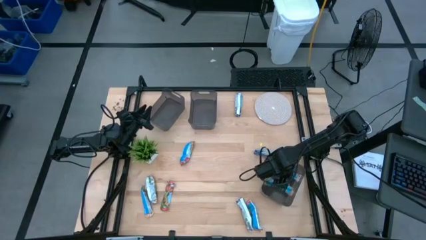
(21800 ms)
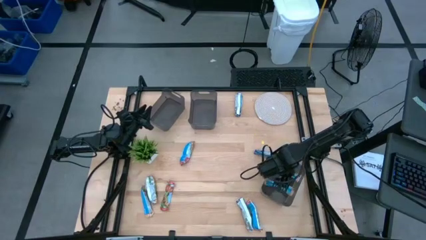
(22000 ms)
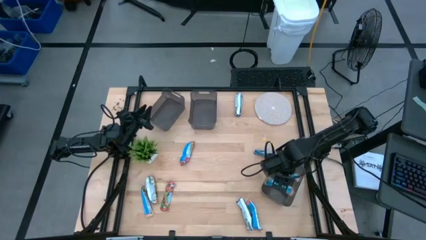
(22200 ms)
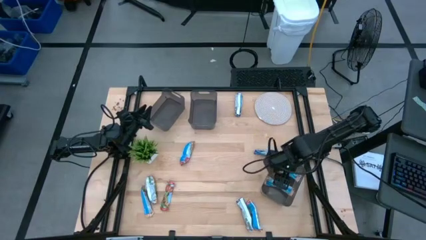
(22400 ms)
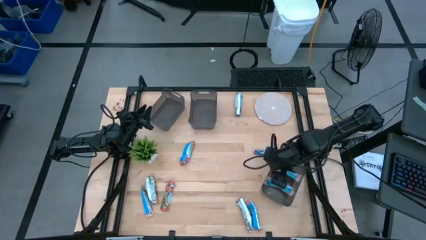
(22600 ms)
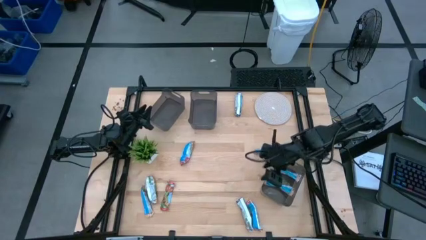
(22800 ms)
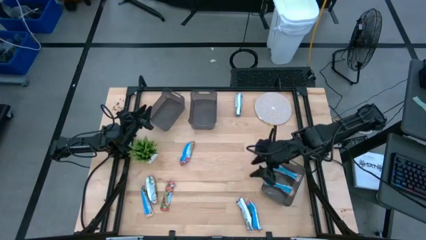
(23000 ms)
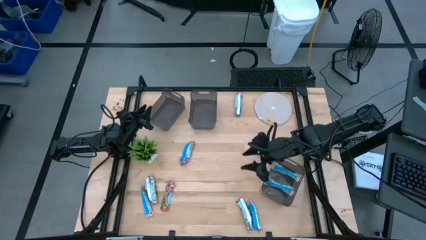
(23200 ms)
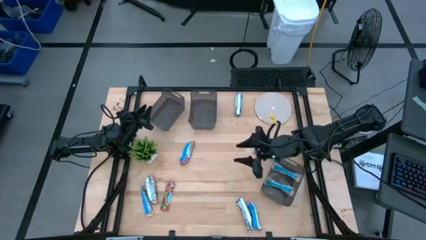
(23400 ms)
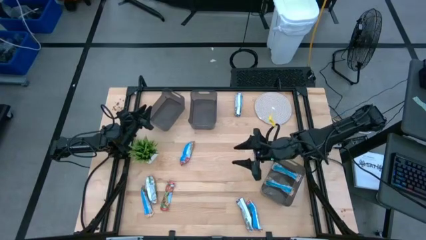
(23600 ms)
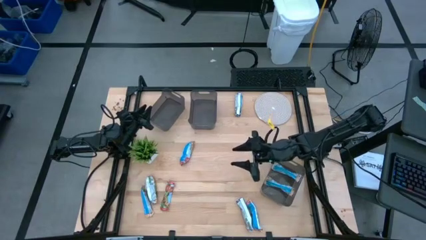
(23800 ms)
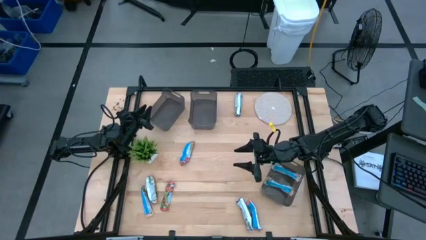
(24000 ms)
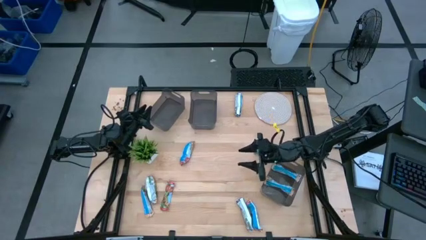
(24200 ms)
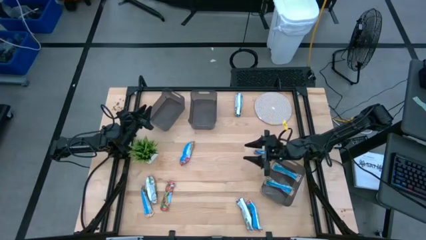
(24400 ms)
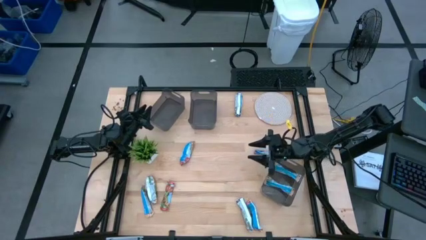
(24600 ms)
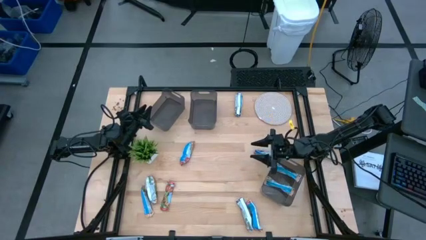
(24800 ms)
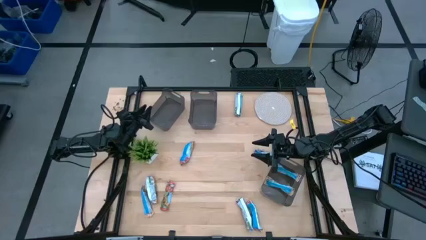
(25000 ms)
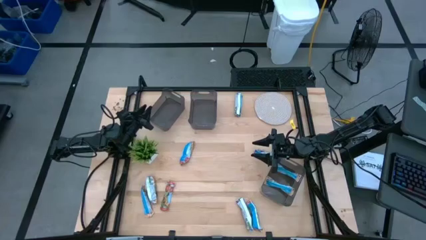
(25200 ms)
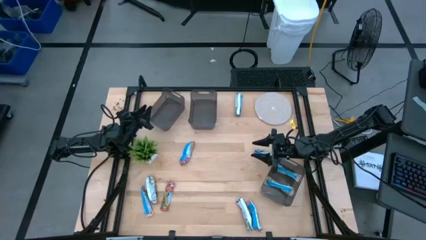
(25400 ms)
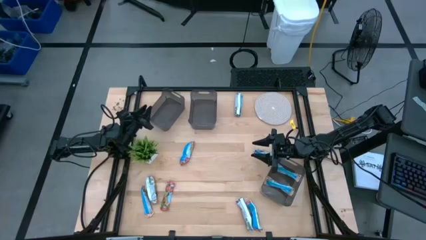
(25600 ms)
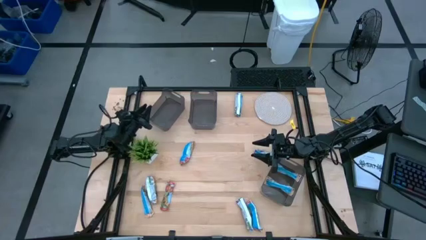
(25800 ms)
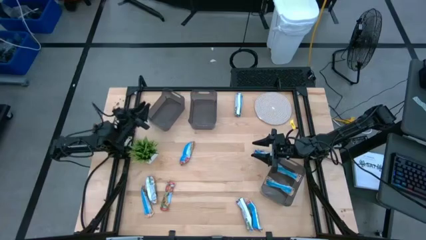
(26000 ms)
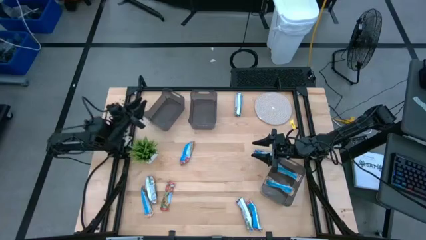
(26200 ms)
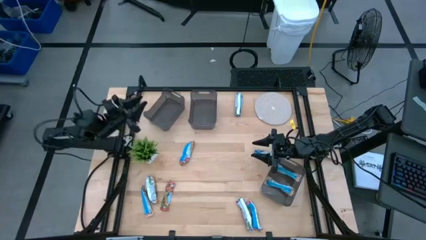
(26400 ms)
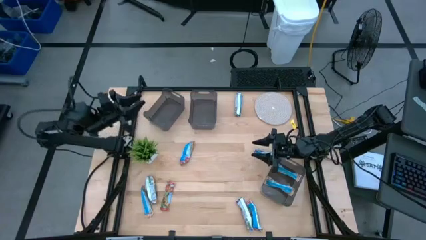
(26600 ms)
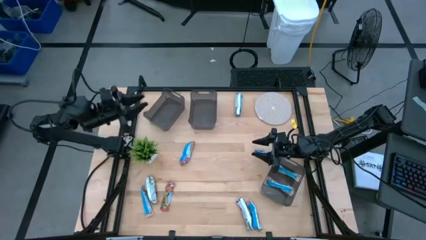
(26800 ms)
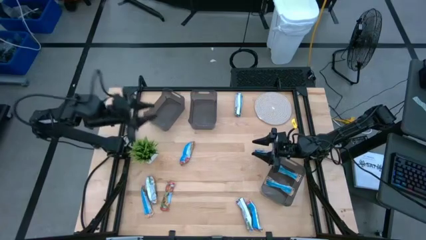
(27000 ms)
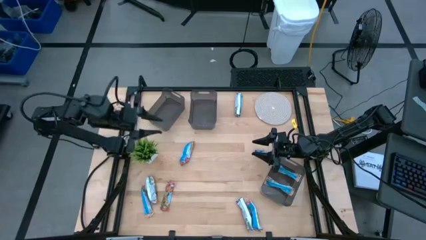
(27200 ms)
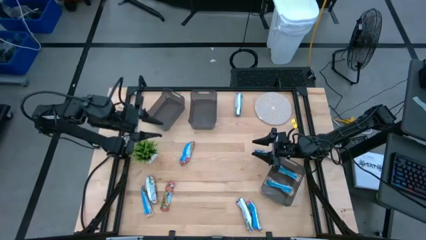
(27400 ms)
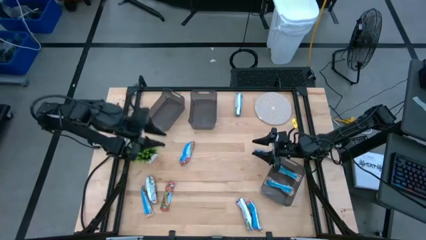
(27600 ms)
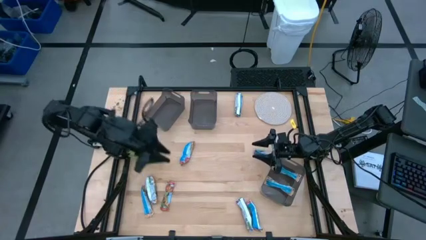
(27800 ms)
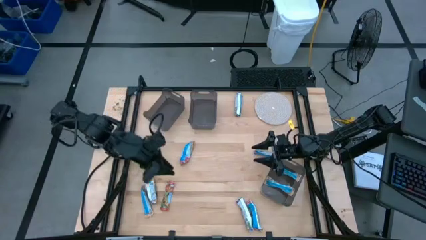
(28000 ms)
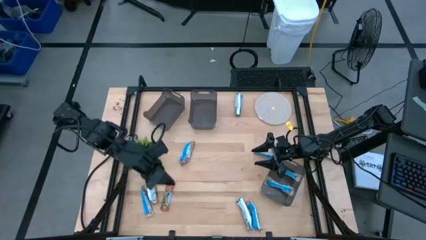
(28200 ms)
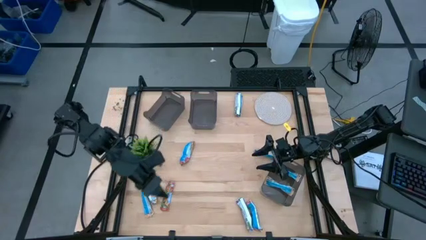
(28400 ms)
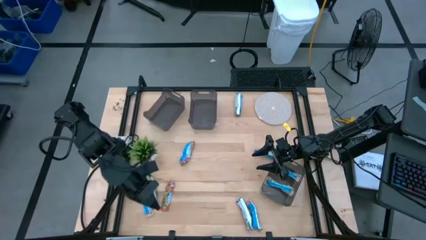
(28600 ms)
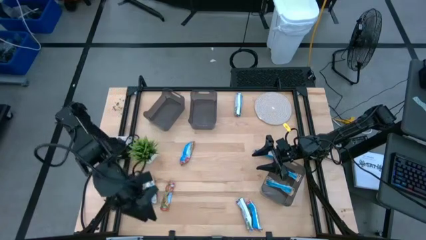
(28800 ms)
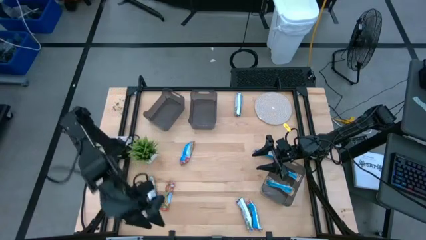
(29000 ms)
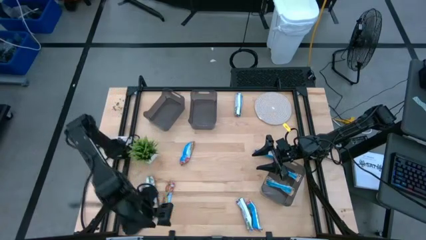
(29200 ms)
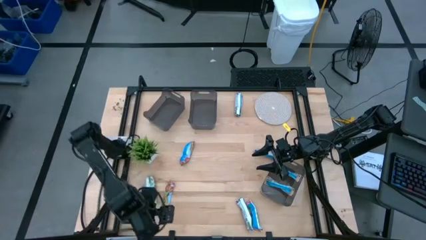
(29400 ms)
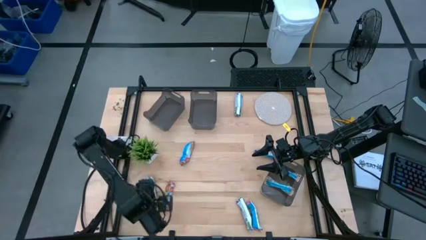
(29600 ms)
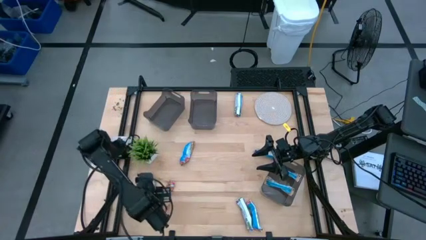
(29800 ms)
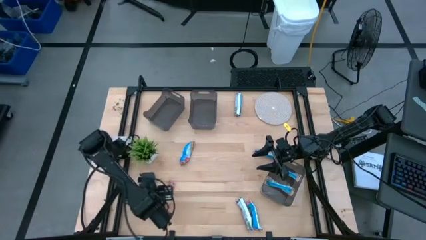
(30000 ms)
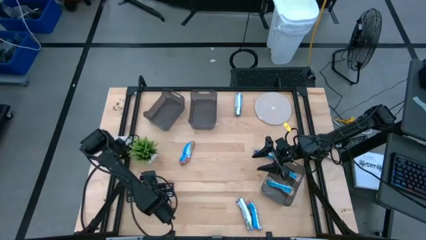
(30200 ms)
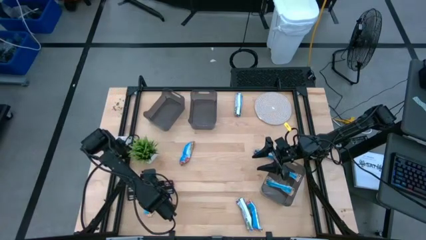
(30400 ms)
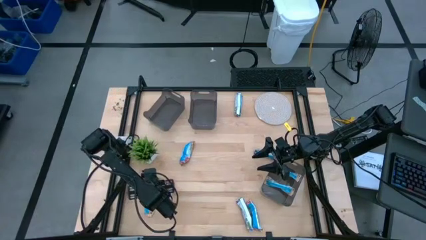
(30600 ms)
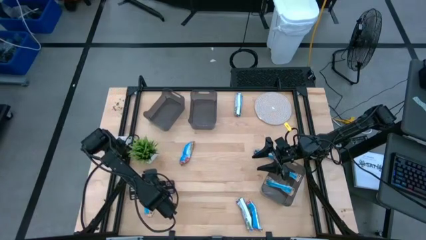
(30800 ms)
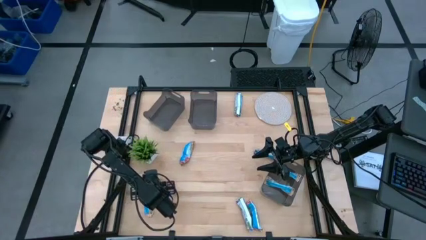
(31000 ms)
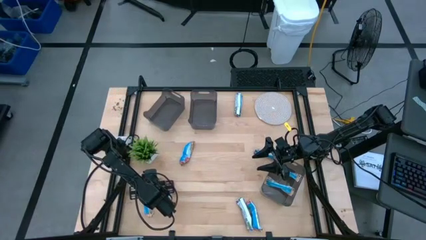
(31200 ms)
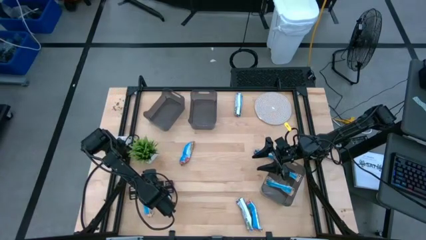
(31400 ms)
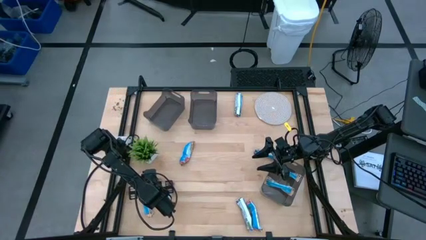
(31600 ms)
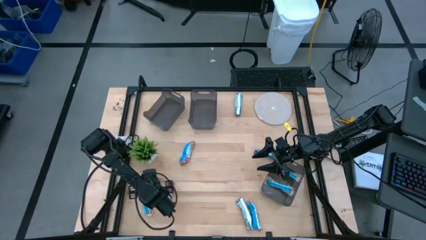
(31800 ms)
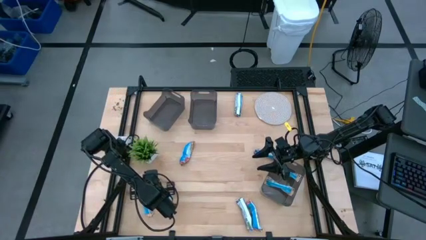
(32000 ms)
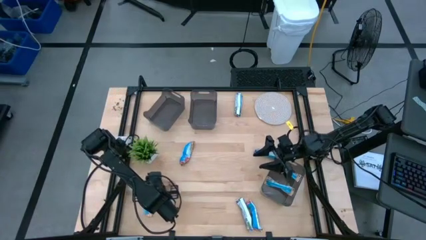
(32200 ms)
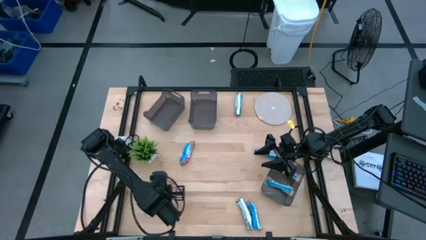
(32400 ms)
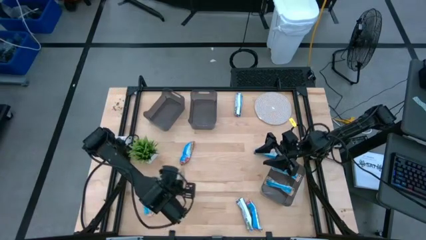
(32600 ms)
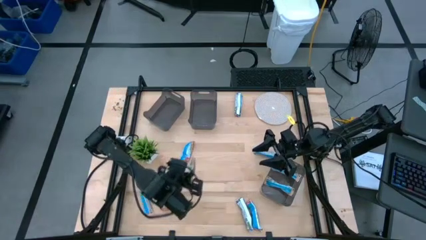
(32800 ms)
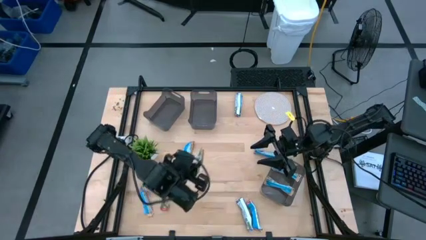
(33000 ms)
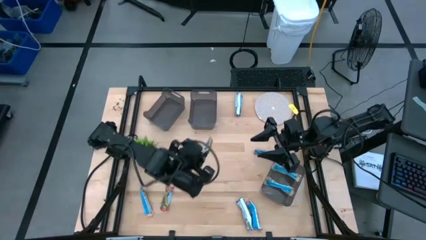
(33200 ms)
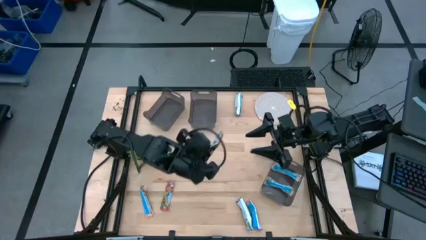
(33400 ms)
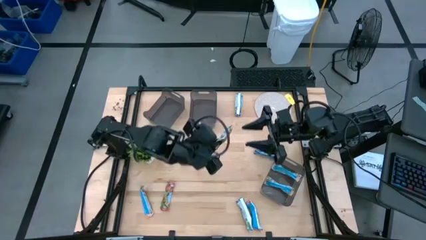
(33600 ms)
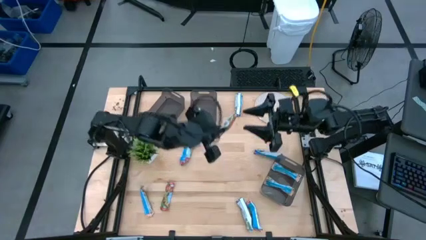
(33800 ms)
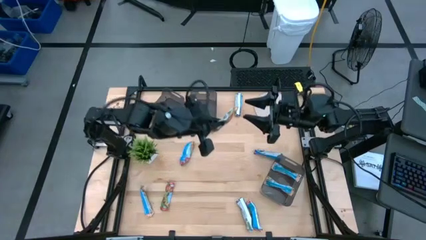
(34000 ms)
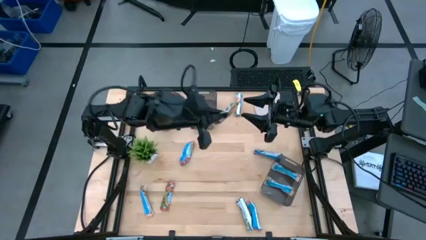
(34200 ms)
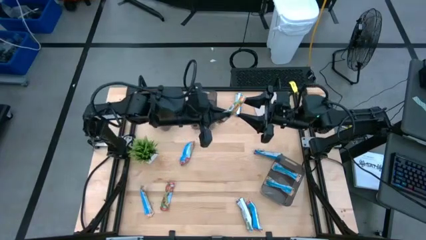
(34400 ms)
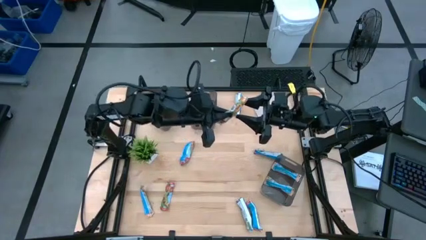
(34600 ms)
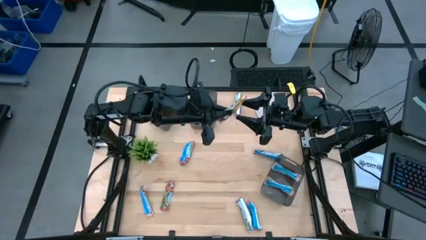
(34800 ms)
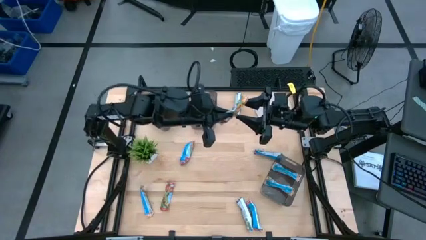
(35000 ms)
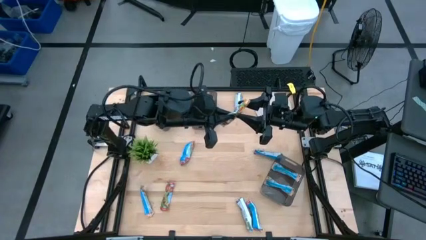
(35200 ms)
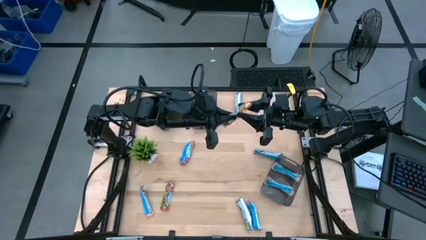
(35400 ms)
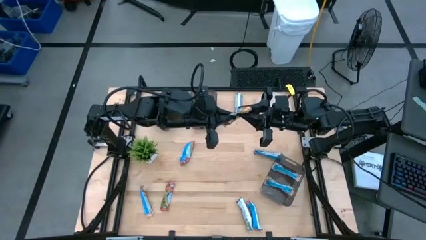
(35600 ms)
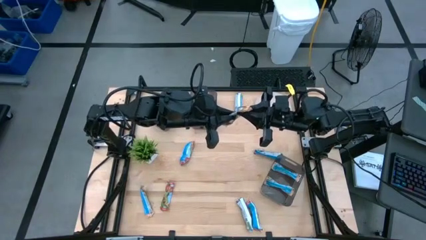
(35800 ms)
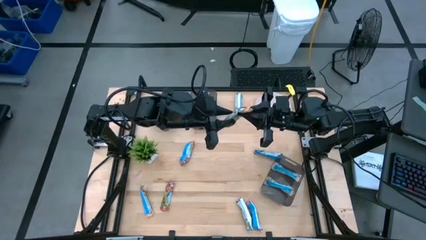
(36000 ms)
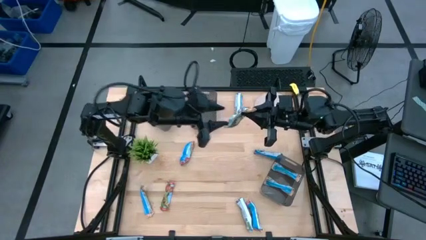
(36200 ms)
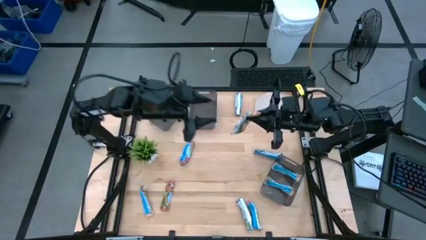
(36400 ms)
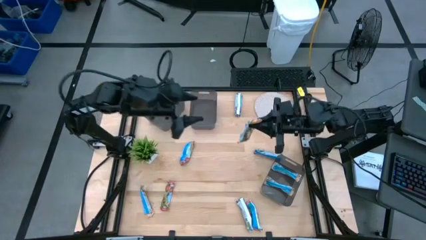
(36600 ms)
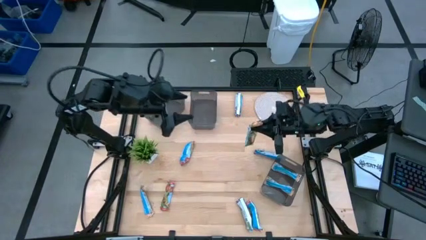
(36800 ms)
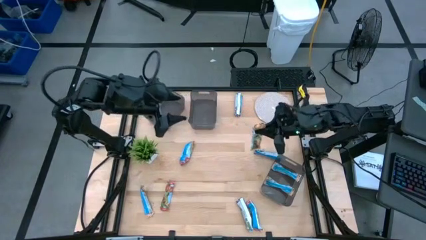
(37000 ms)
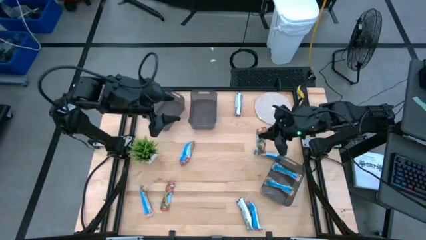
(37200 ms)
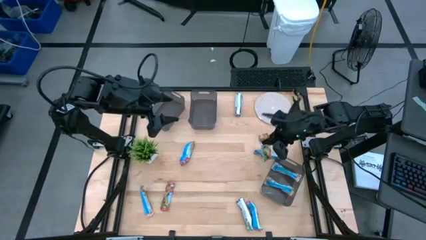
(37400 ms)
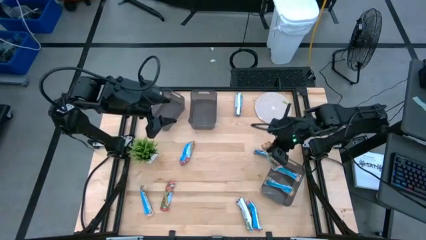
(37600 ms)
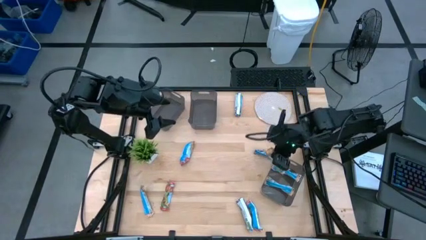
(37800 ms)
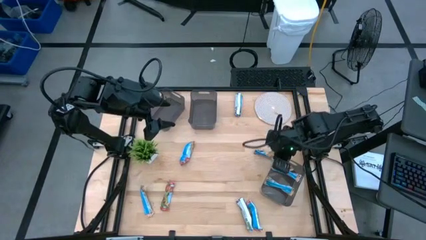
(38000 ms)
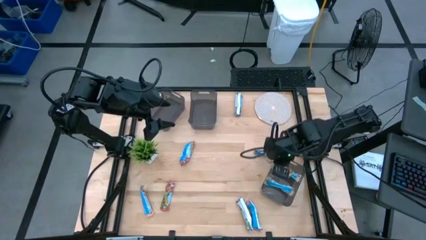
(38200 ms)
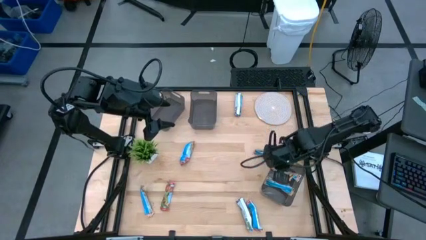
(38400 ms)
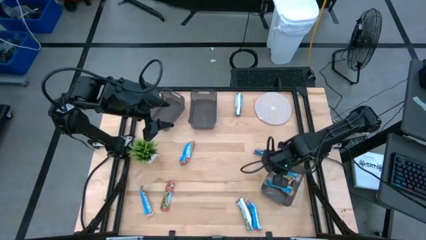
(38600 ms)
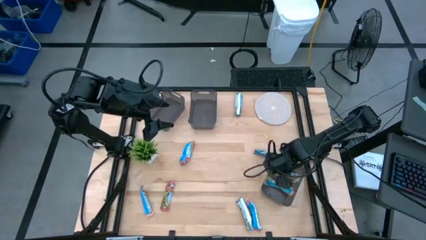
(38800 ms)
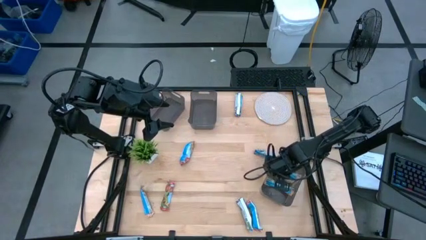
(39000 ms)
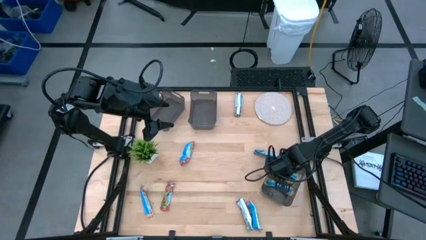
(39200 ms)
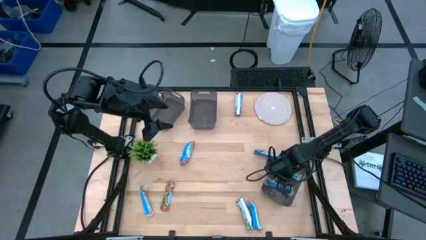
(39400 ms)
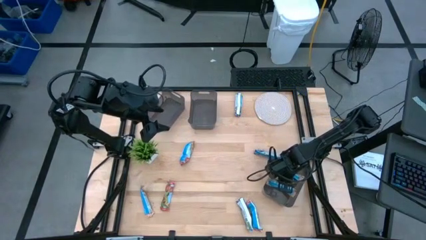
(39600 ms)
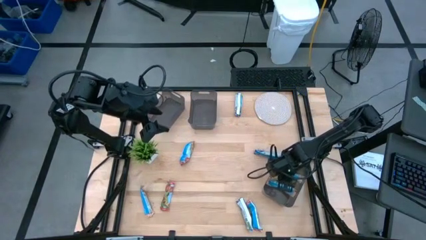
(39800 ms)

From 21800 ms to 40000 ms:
Task: Pick and place Granola Bars by type
Put the yellow granola bar into the bottom black transparent bin
